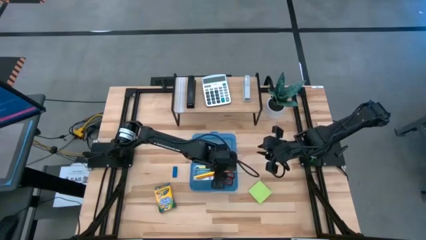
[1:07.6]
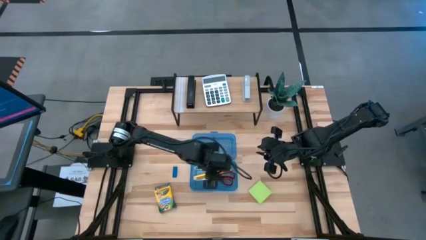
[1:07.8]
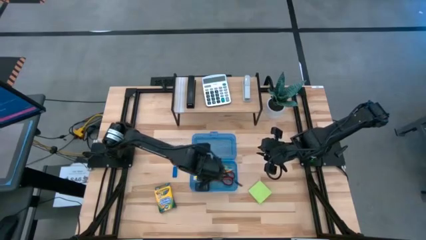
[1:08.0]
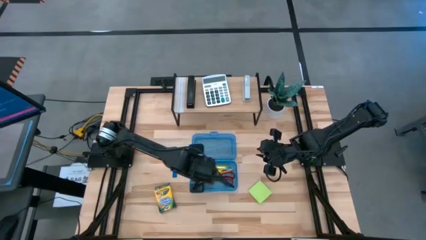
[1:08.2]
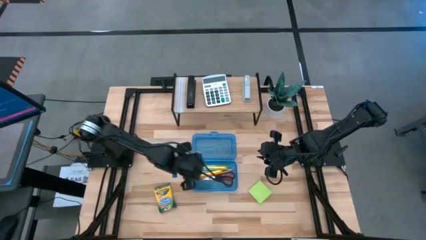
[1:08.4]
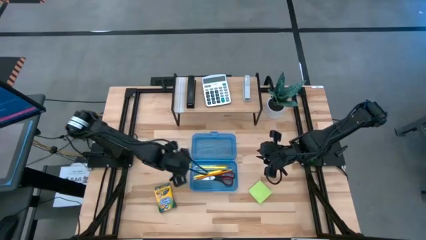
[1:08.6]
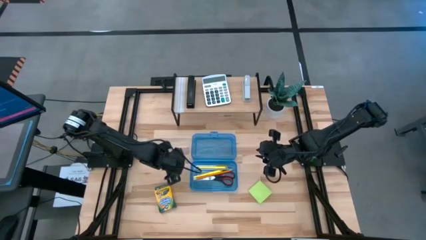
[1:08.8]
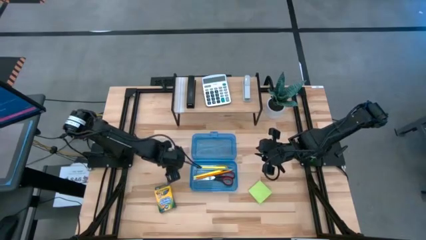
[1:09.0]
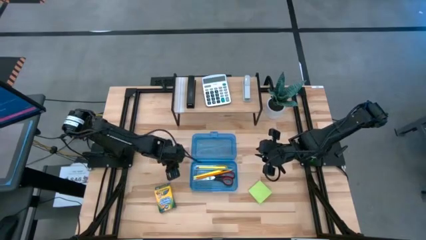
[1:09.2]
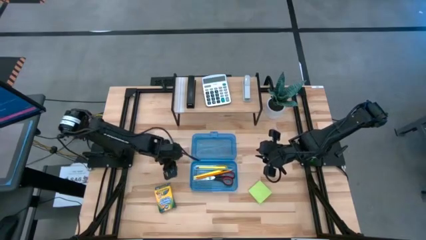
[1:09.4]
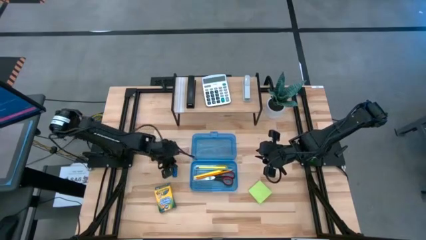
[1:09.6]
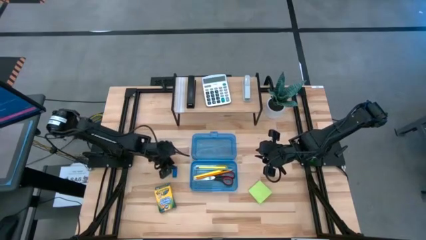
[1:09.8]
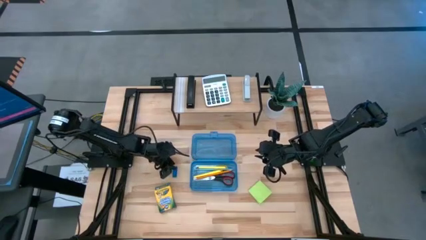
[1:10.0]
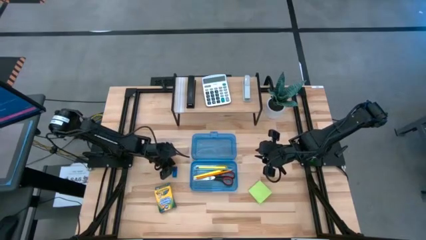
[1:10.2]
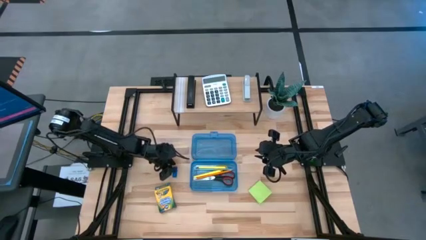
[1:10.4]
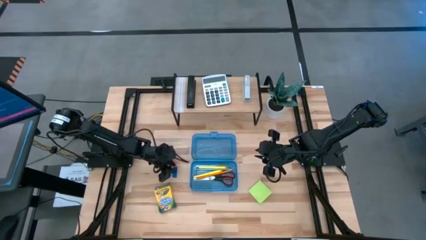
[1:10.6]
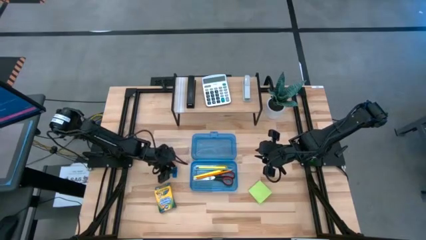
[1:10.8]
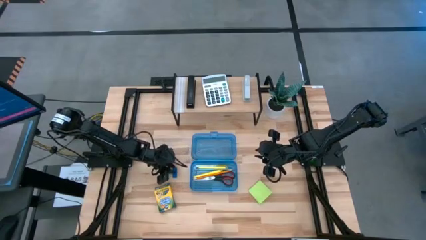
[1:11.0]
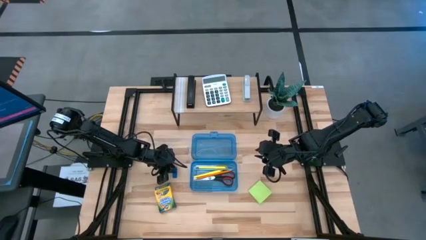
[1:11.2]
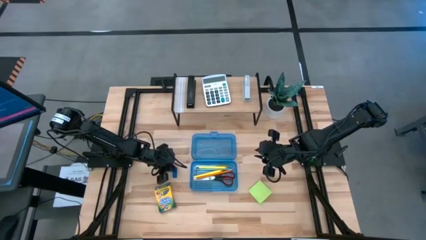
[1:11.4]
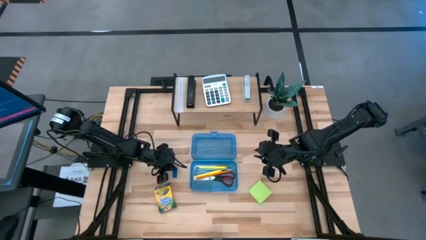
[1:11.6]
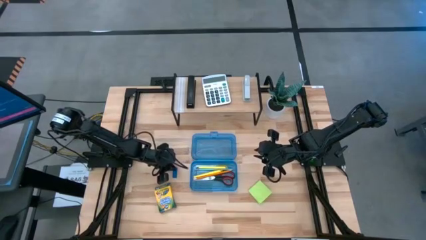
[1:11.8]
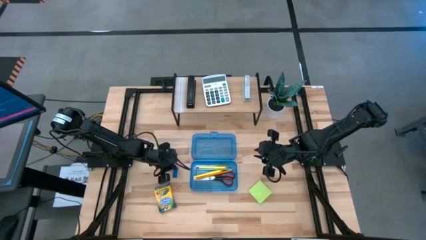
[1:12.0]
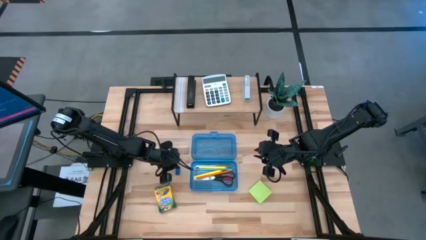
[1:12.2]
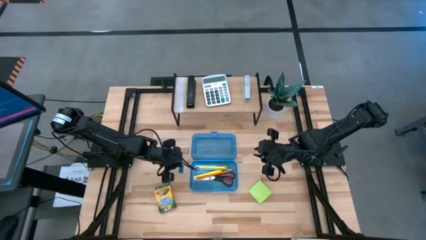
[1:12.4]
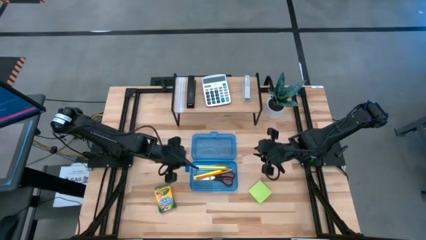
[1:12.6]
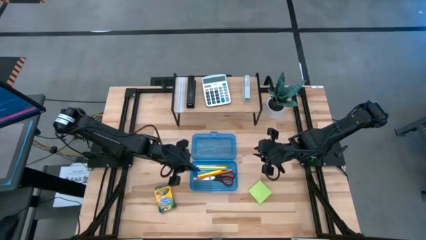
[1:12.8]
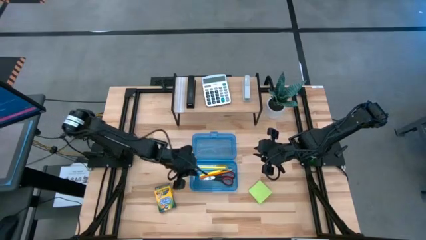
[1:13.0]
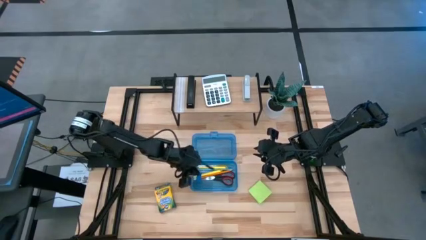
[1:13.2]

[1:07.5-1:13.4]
Task: Pack school essentials
Put the blue eraser into the blue supply box

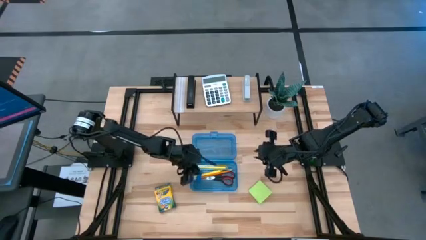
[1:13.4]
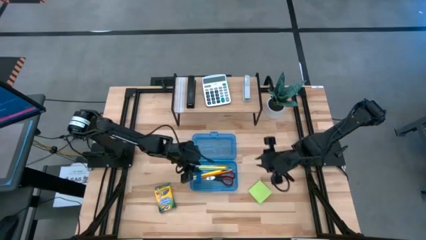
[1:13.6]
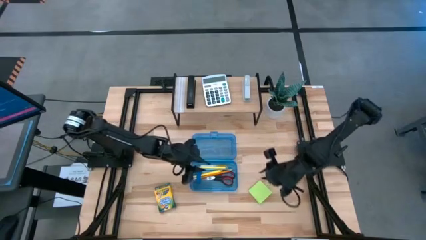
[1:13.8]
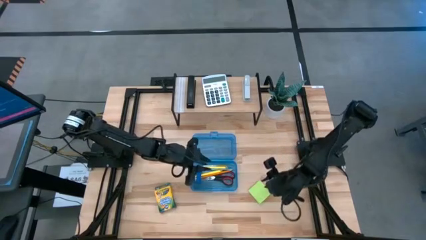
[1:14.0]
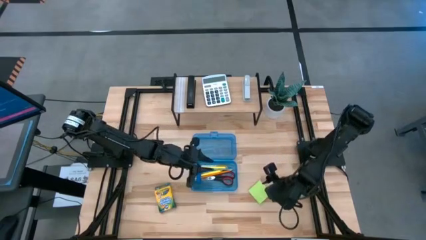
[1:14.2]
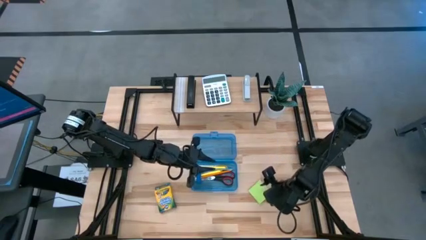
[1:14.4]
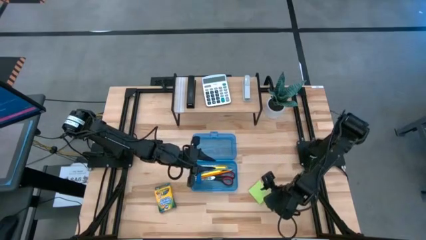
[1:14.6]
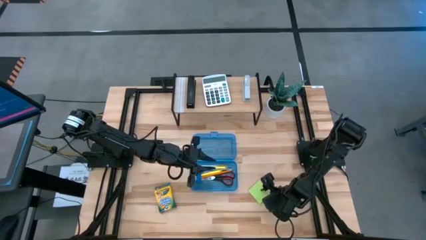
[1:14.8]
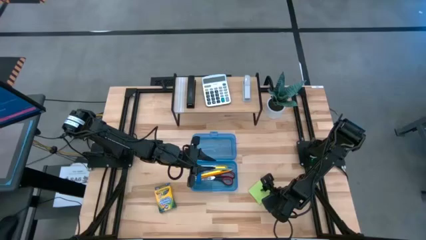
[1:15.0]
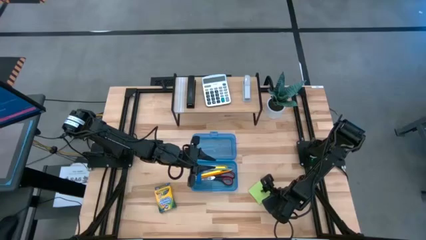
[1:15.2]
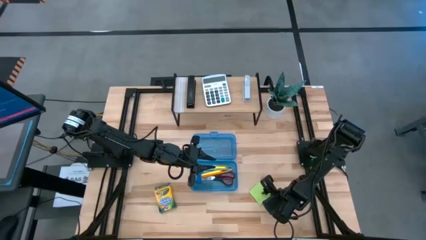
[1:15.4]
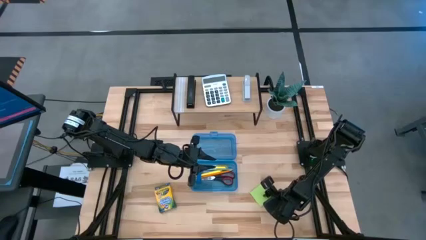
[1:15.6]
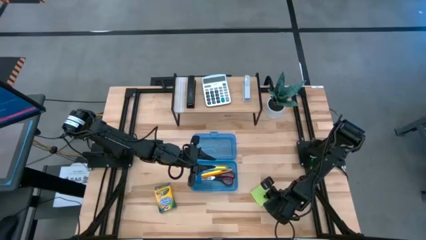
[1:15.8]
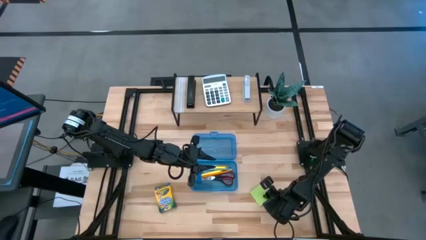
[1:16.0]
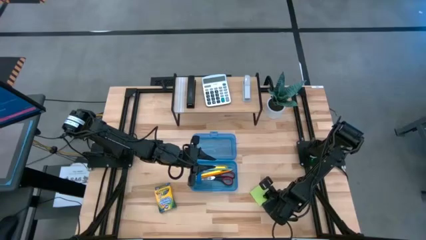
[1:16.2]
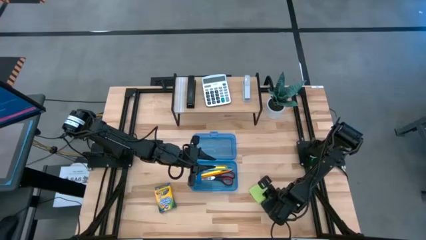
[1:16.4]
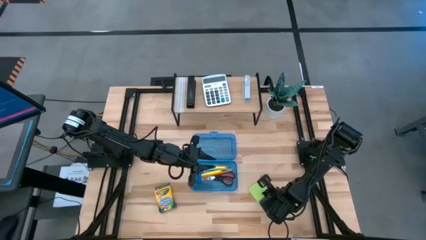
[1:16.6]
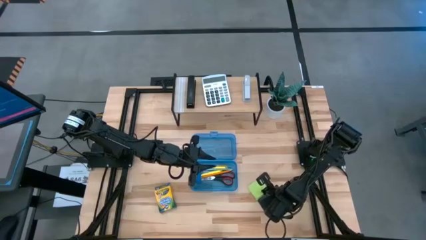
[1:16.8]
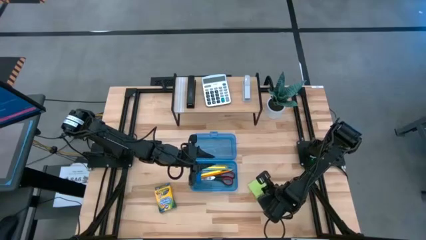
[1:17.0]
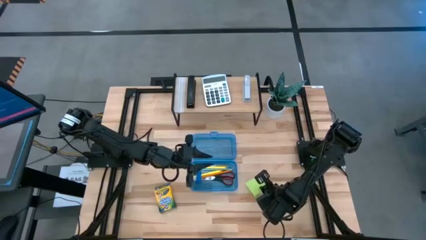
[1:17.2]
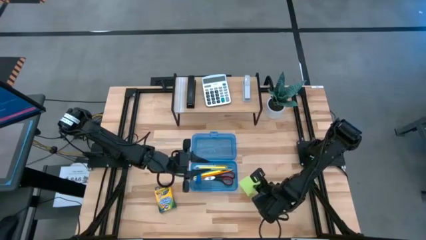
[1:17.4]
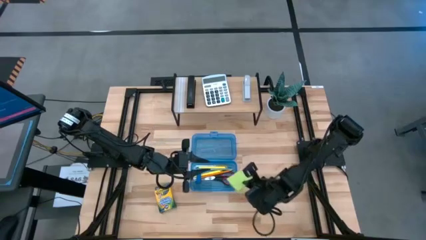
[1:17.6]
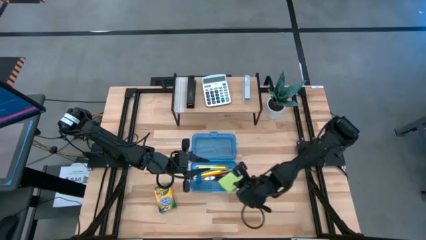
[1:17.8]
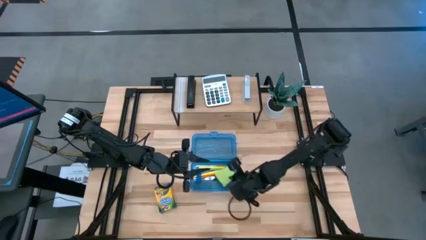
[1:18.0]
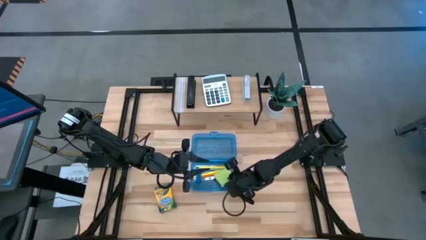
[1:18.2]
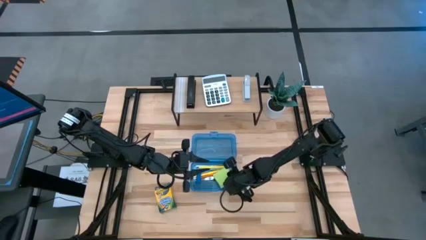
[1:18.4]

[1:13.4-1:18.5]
Put the green sticky note into the blue supply box

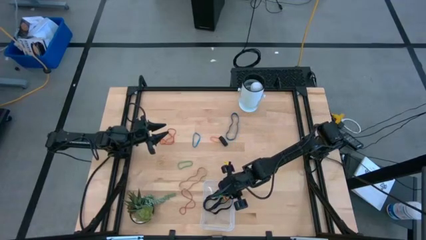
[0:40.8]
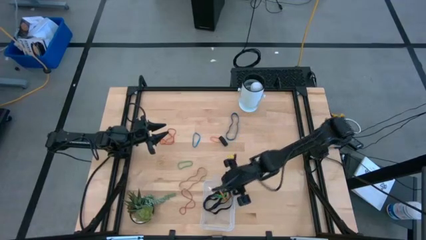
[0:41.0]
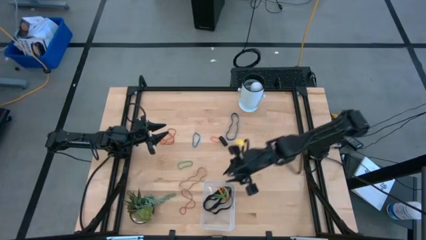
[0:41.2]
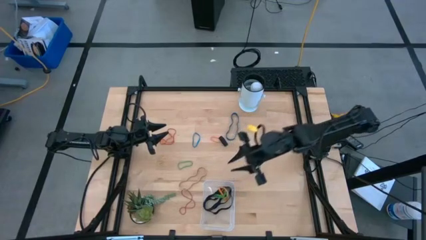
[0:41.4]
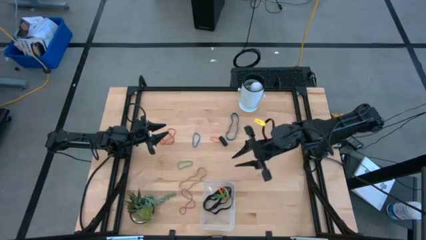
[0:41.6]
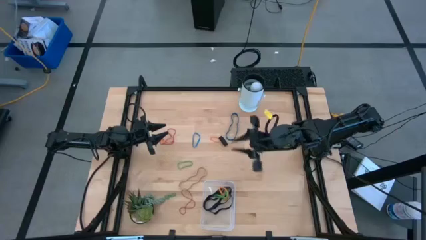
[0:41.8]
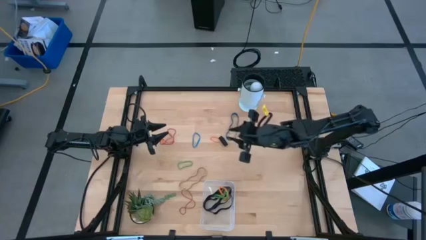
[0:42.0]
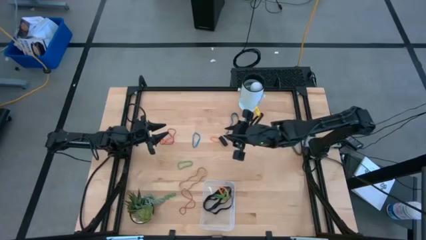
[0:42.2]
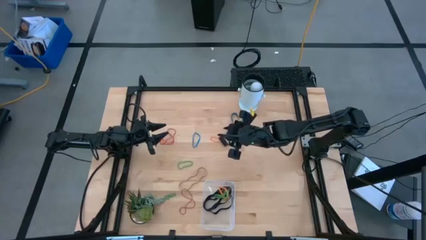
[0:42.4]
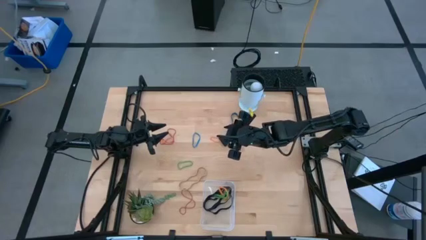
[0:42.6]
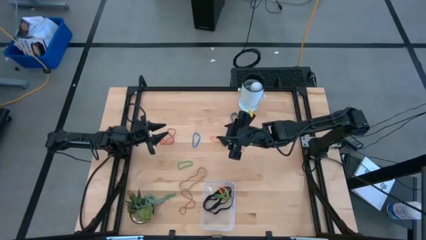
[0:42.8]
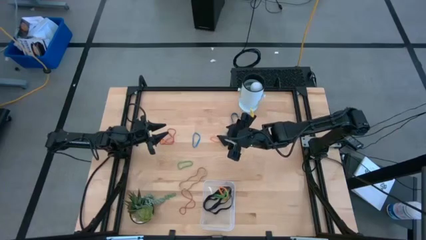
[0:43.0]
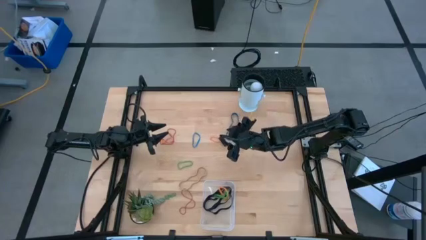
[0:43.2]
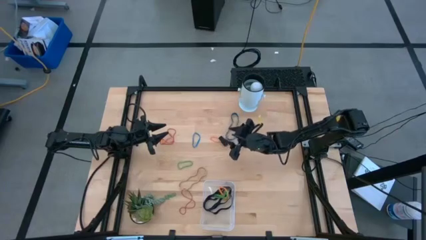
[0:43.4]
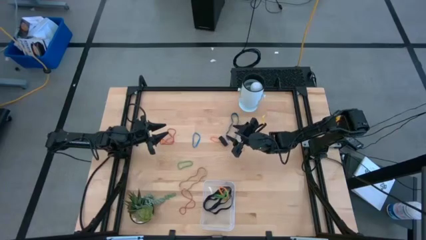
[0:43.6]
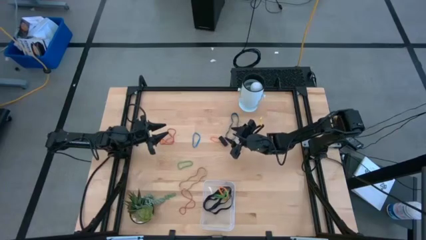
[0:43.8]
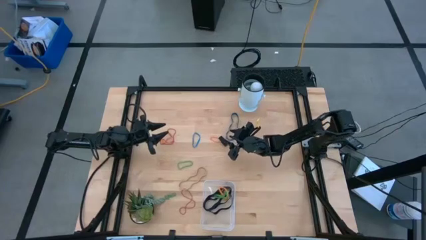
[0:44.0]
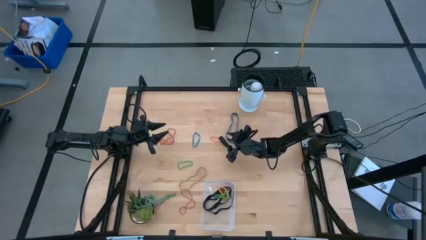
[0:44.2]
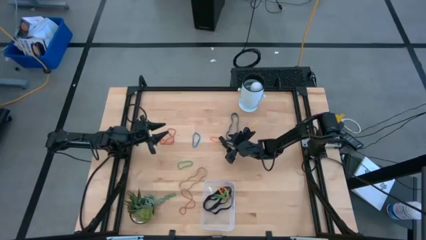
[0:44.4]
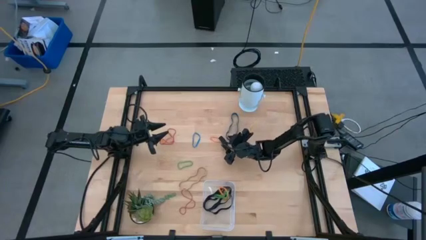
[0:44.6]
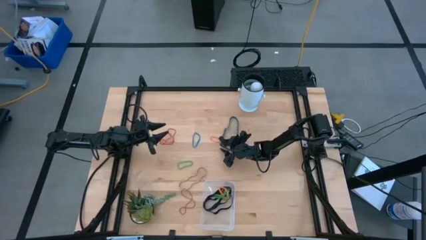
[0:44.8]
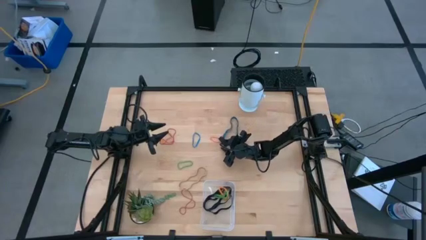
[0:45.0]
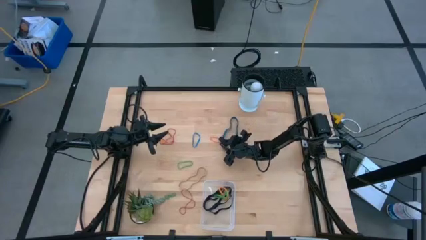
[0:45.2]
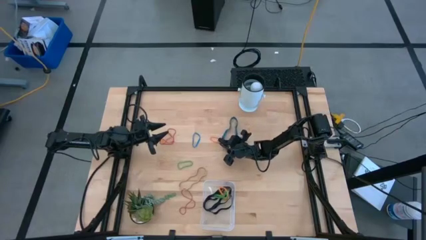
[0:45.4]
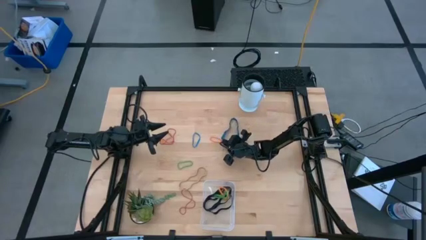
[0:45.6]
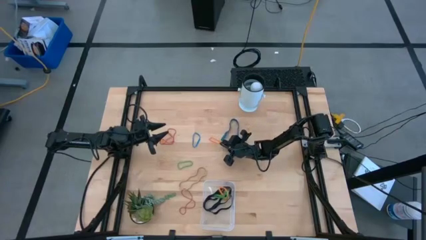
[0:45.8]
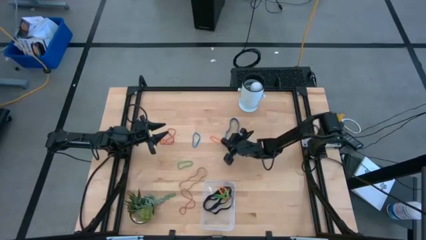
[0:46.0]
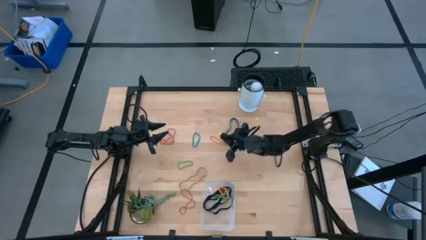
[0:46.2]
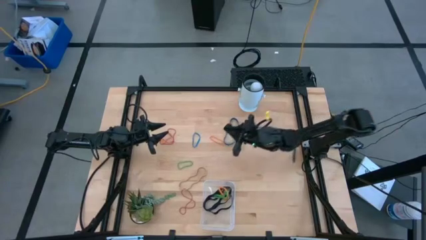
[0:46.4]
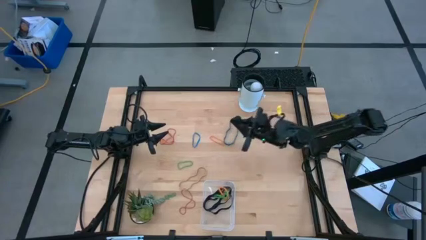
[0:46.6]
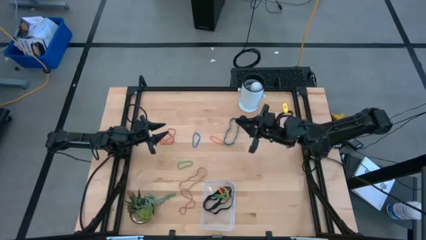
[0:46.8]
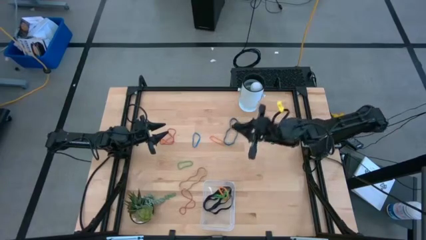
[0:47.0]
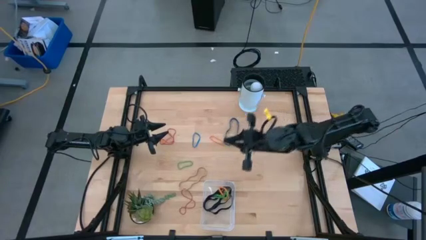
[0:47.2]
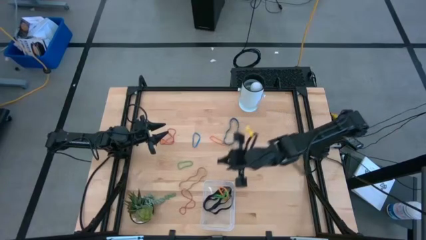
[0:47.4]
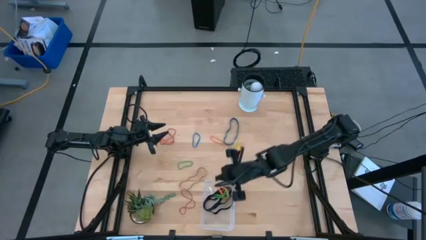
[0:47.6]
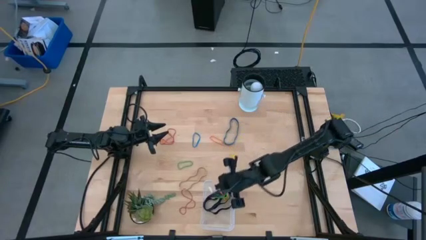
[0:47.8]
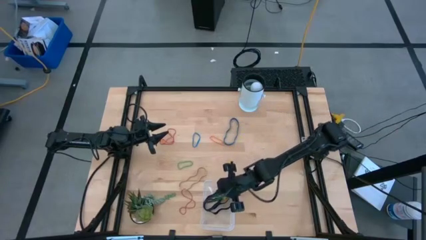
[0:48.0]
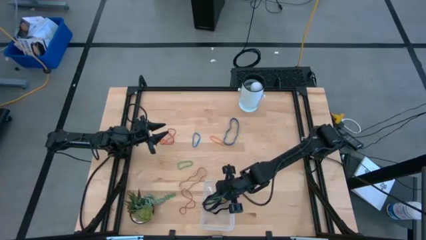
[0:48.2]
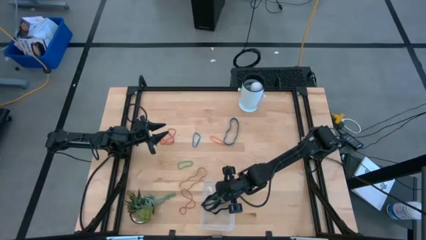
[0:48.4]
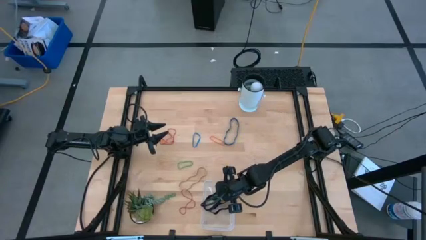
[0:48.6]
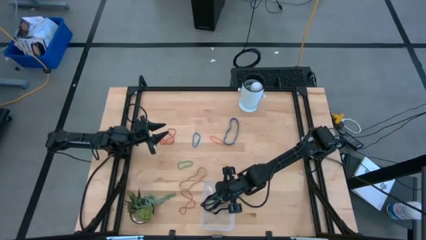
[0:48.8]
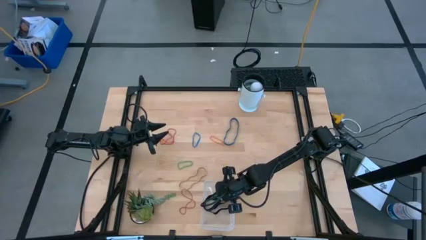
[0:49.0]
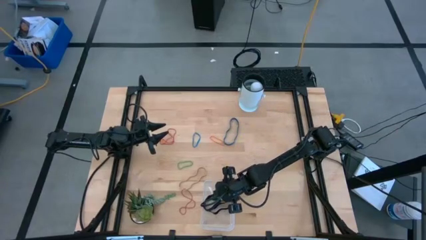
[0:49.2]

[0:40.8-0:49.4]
Task: Pick and place rubber bands into bin
Put the black rubber band into the transparent bin
